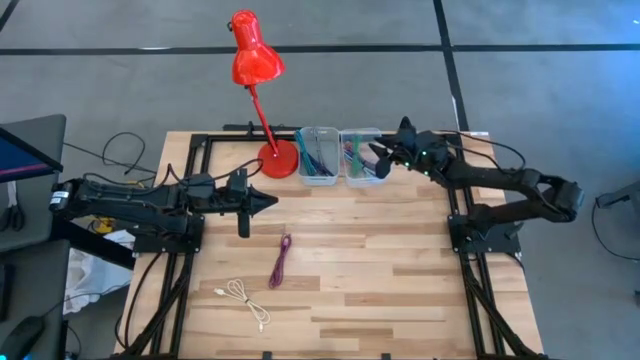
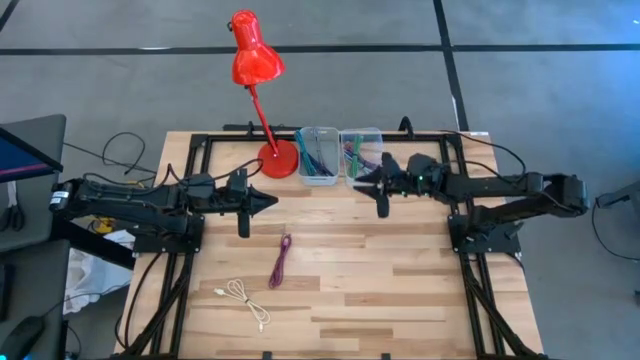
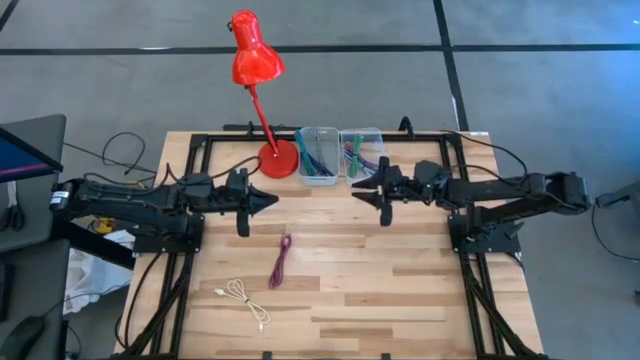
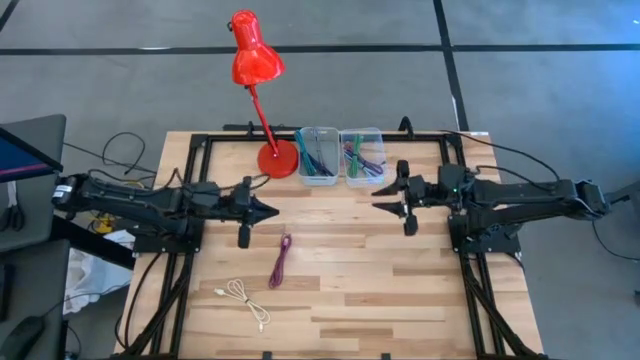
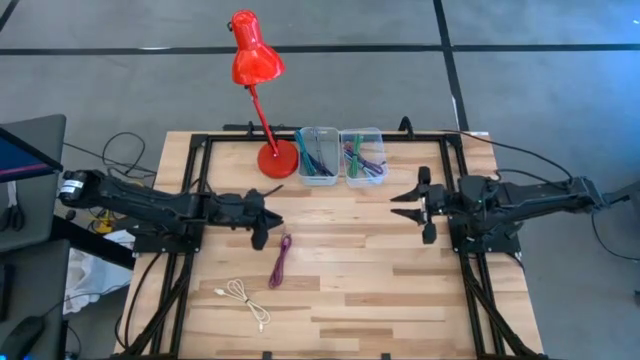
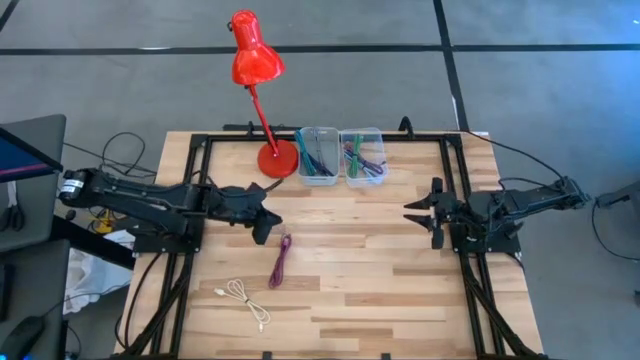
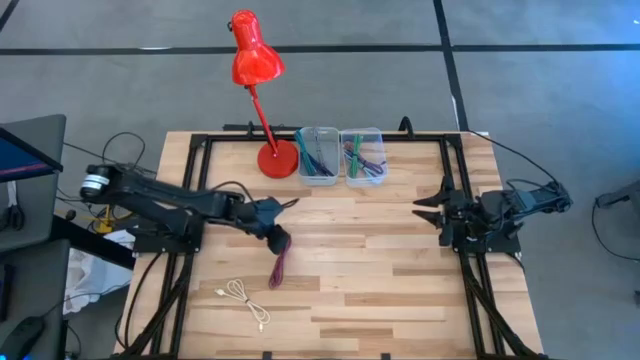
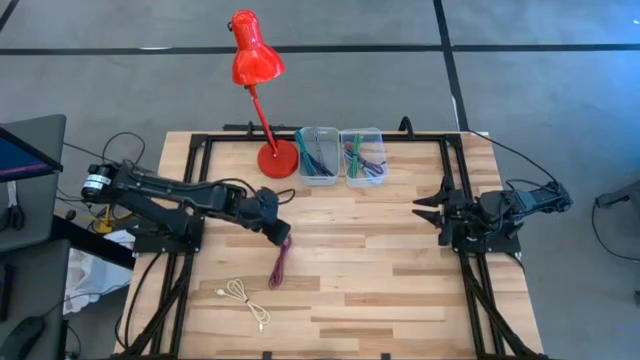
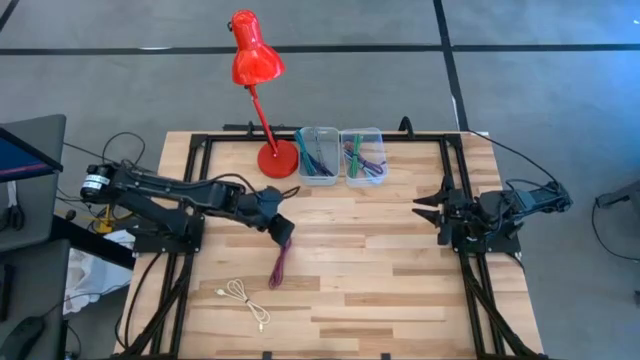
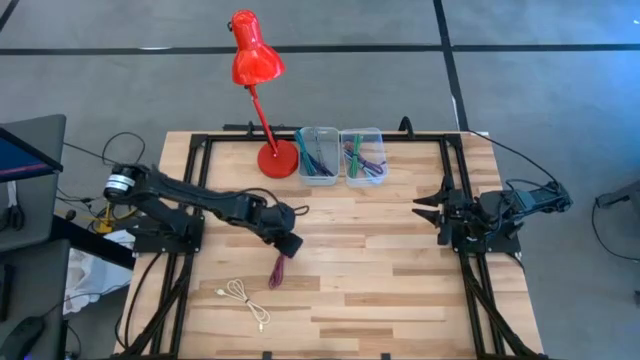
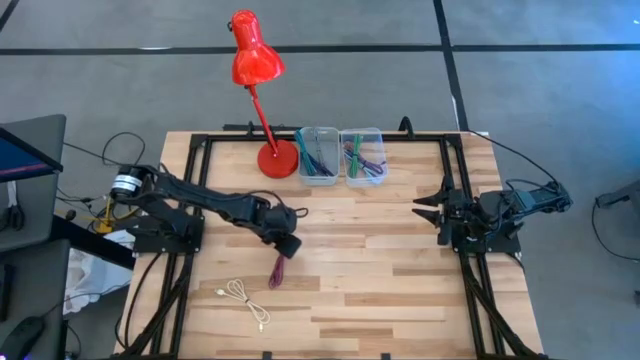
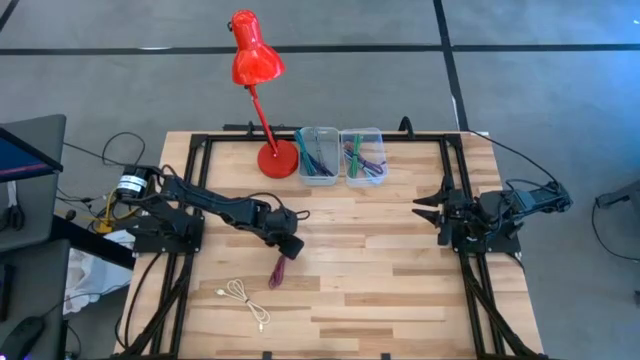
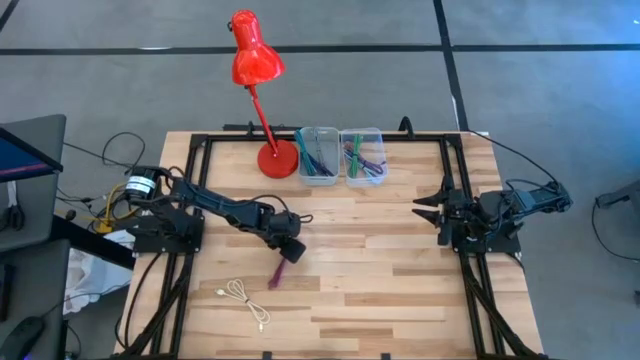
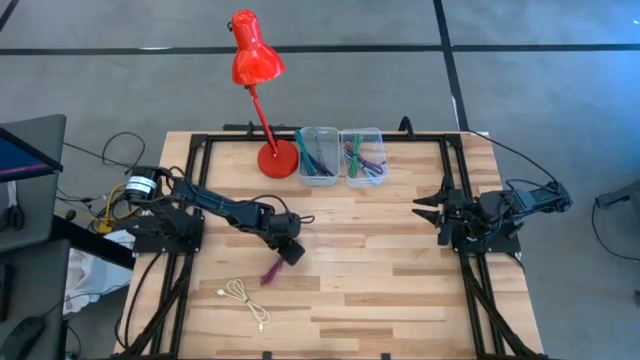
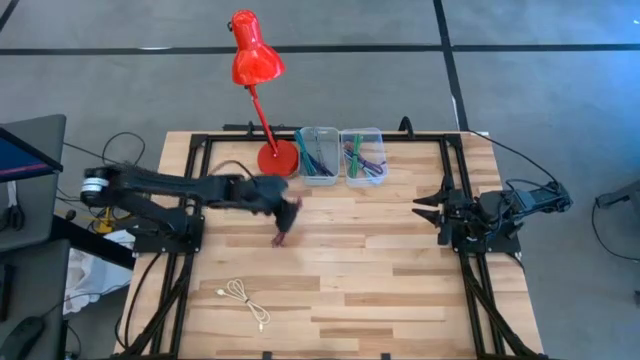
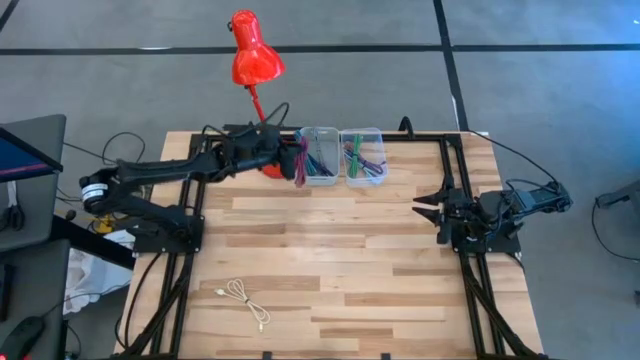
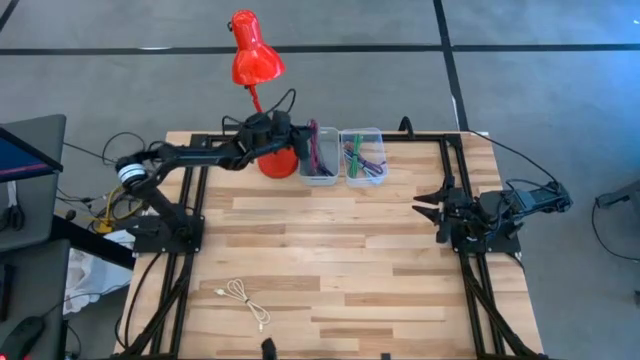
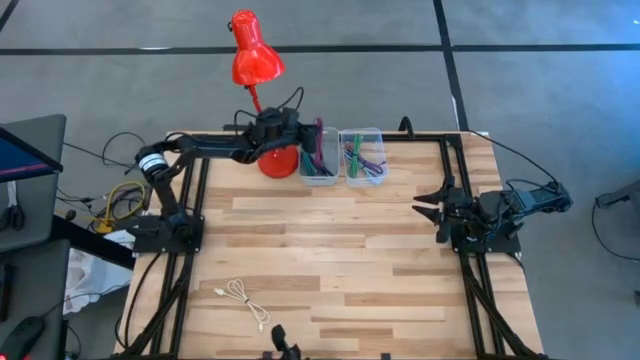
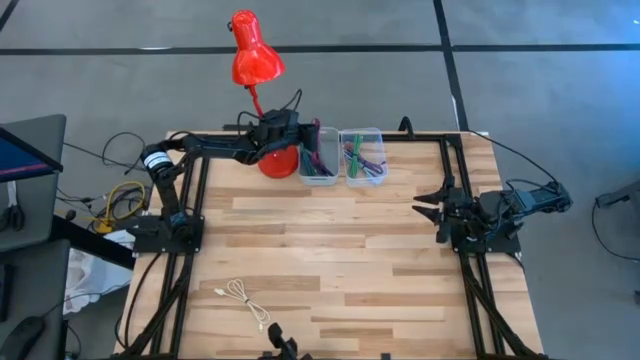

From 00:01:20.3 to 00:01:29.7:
Task: Pick & Place USB Port
Put the black and pink charger cable into the gray bin

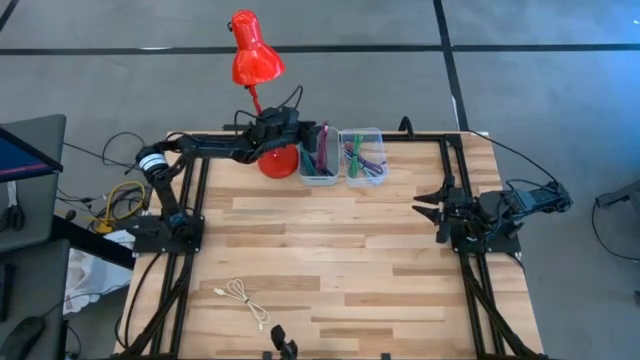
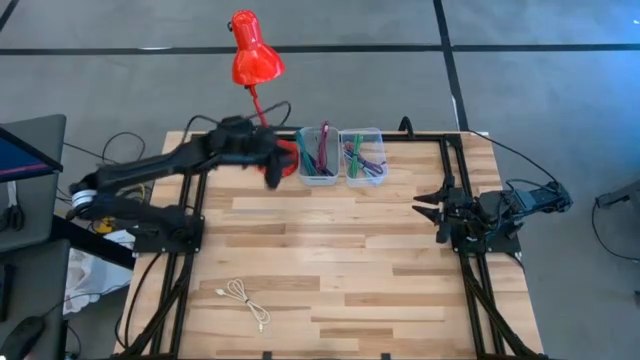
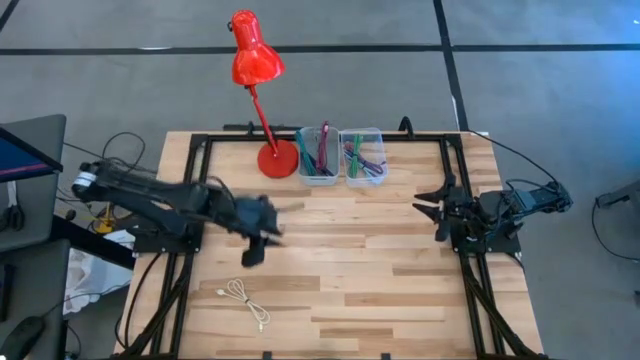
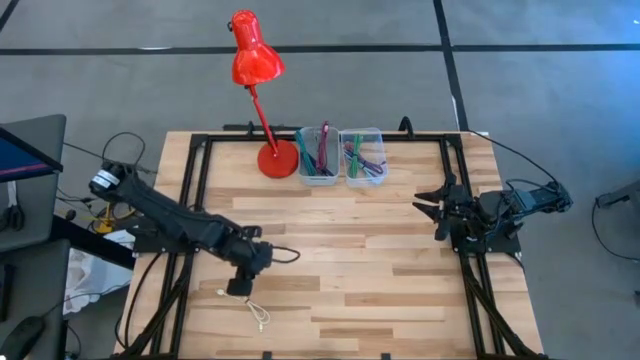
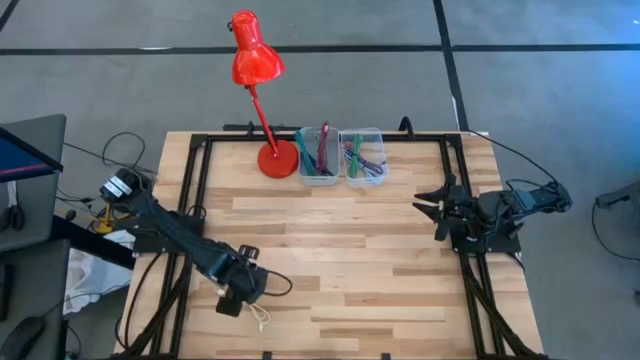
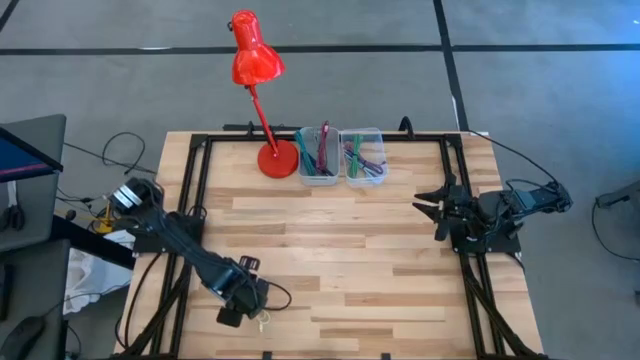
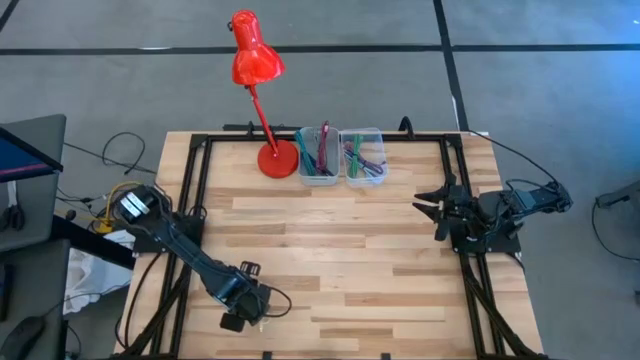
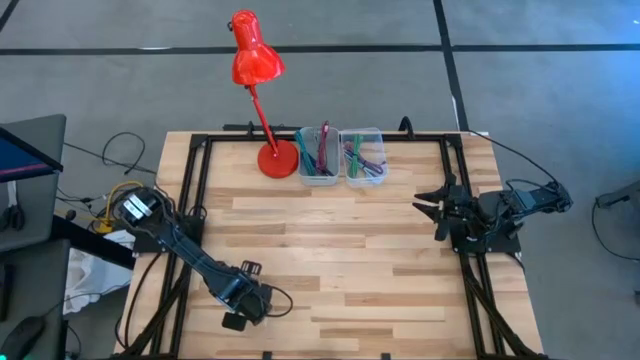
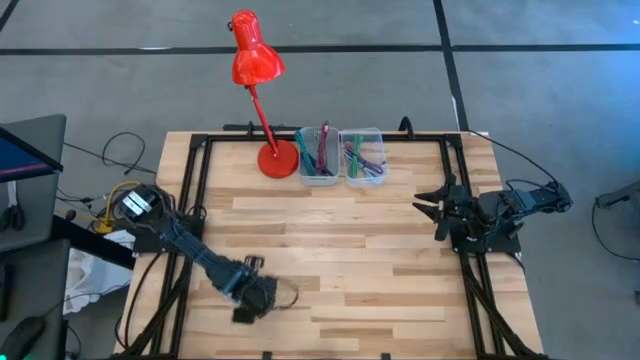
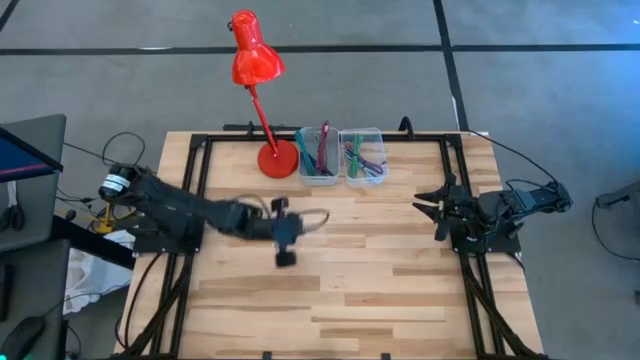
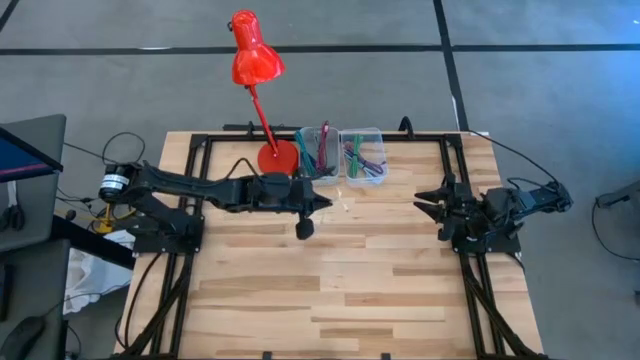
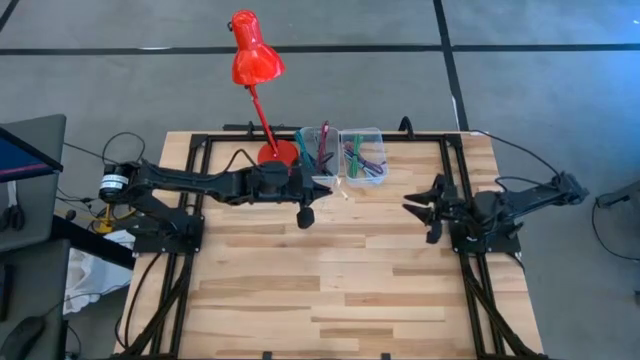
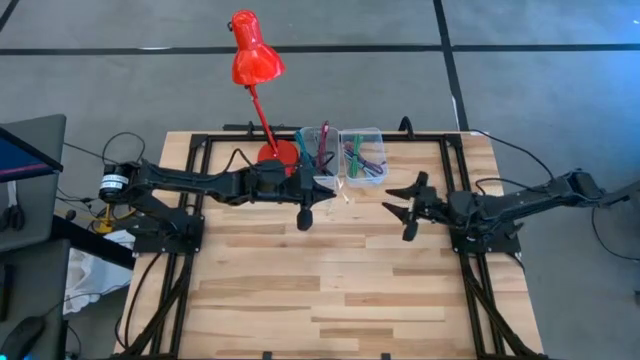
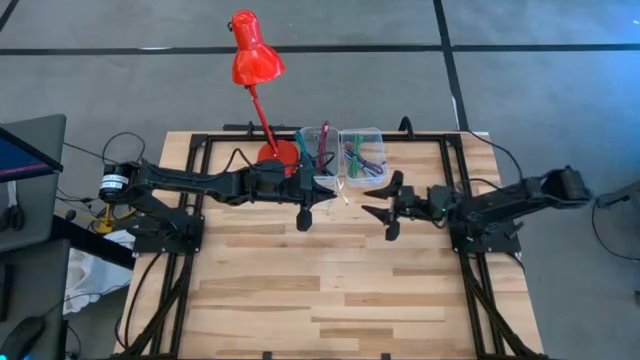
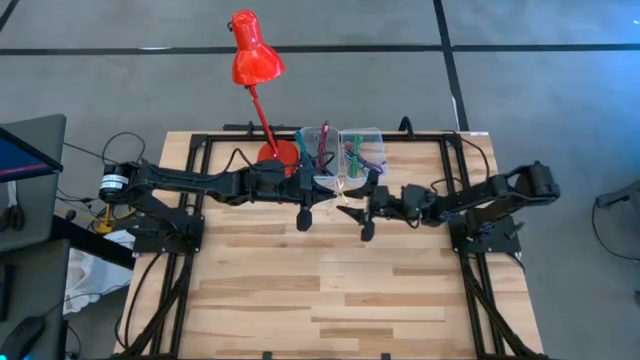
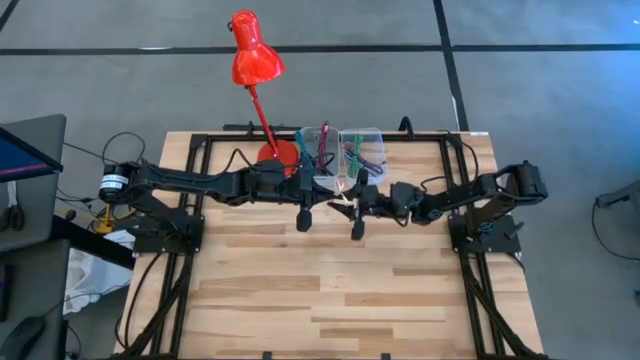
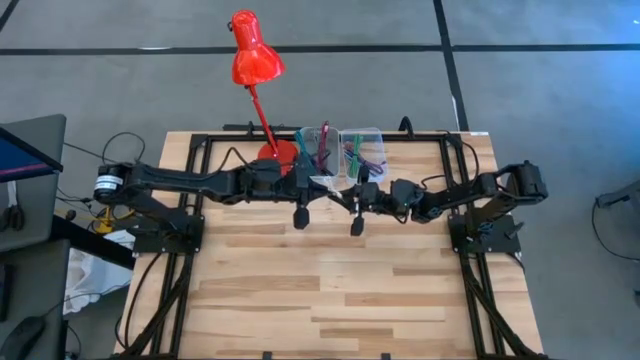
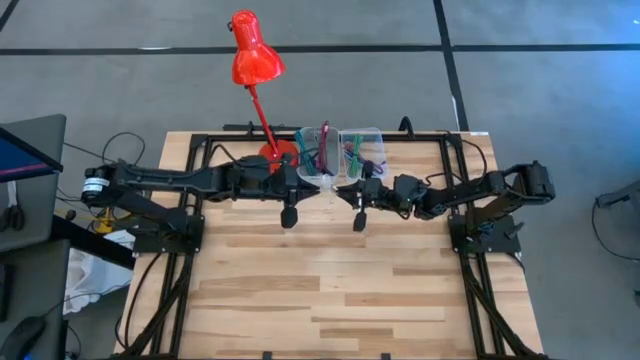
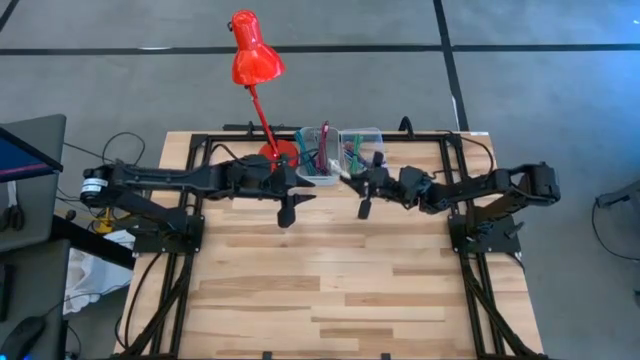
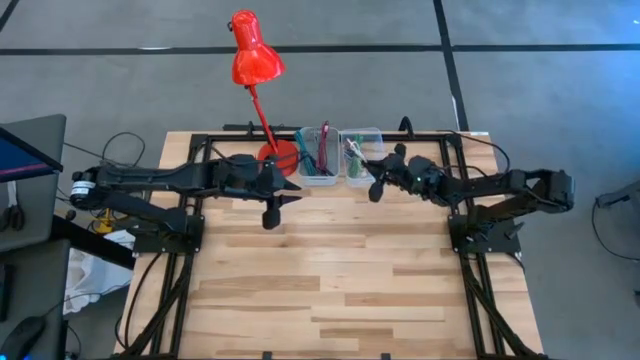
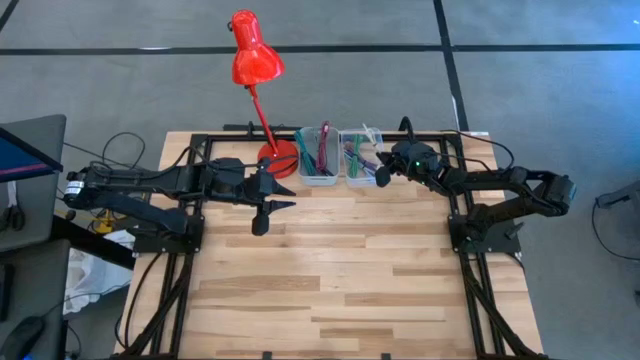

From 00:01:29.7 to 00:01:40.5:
Put the white charger cable into the transparent bin
